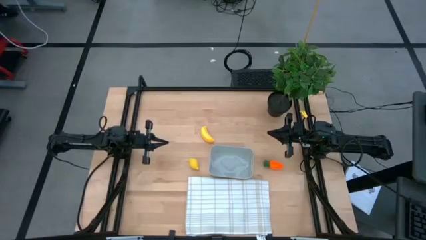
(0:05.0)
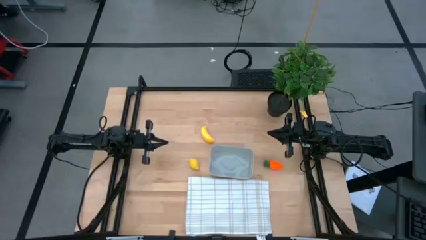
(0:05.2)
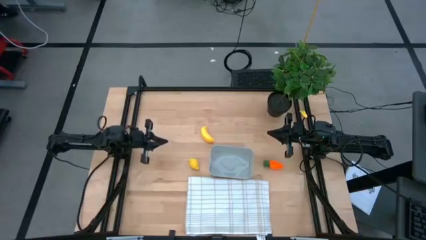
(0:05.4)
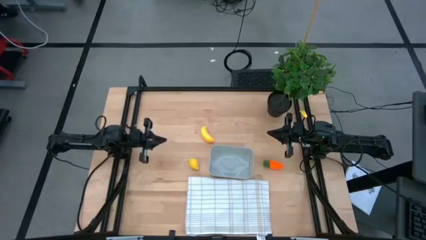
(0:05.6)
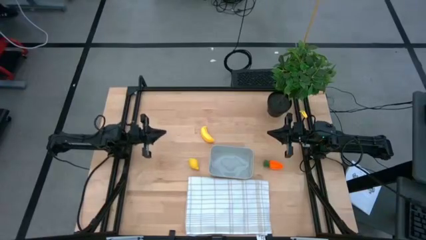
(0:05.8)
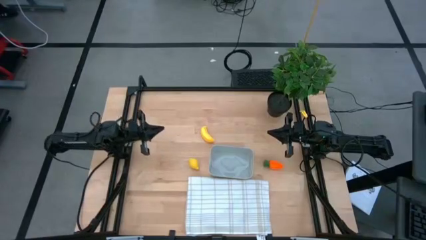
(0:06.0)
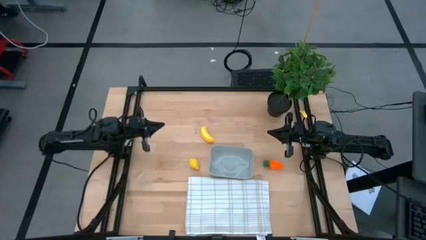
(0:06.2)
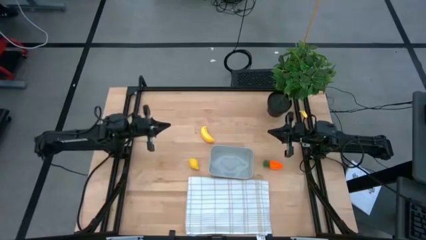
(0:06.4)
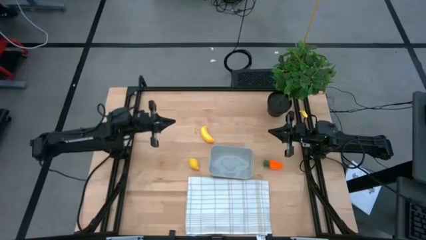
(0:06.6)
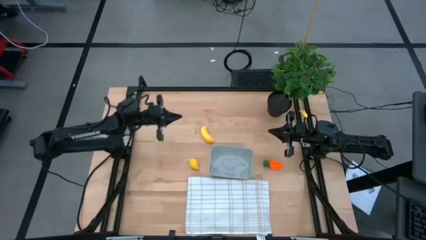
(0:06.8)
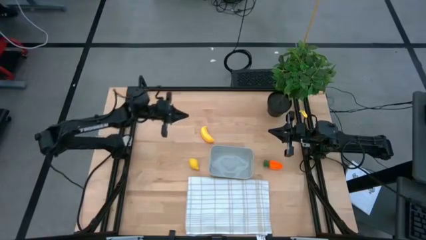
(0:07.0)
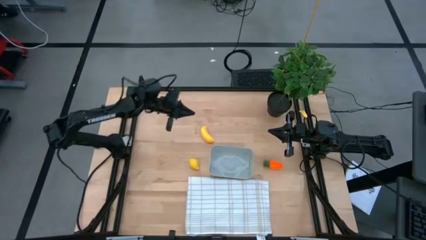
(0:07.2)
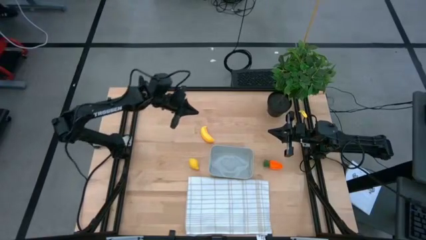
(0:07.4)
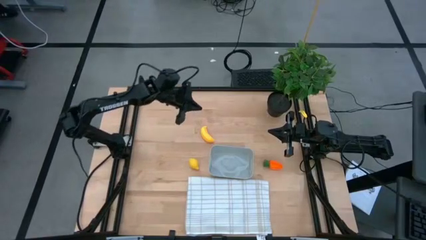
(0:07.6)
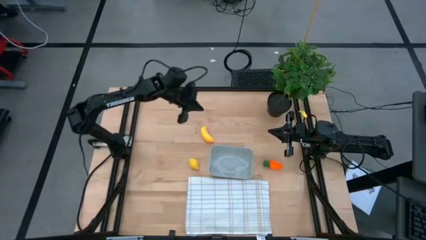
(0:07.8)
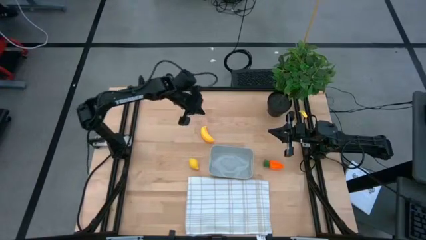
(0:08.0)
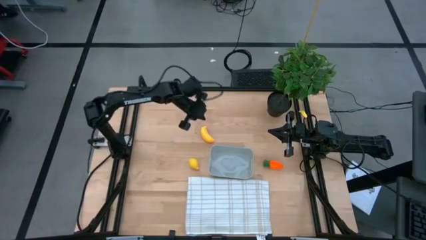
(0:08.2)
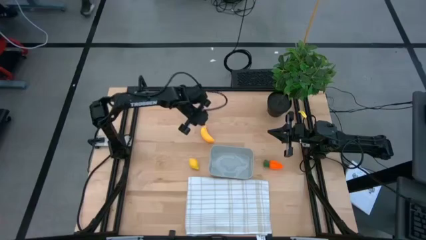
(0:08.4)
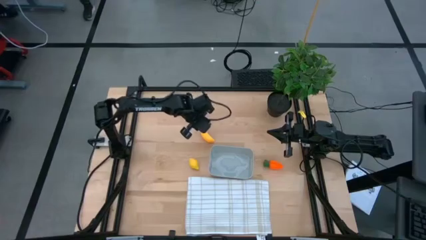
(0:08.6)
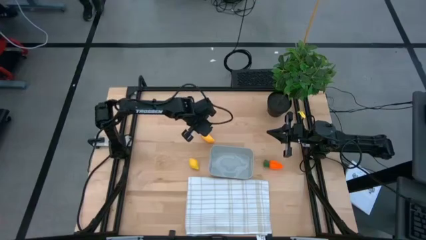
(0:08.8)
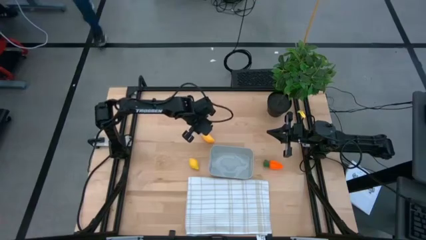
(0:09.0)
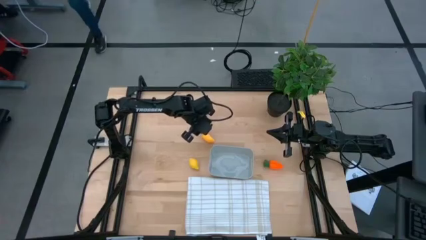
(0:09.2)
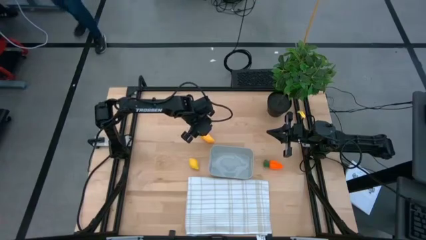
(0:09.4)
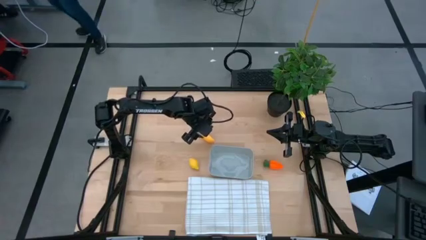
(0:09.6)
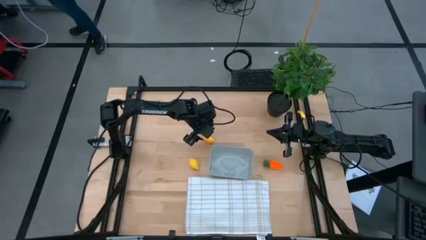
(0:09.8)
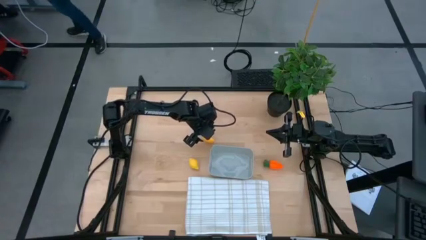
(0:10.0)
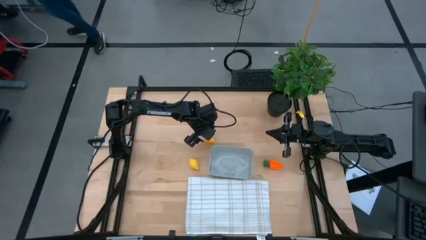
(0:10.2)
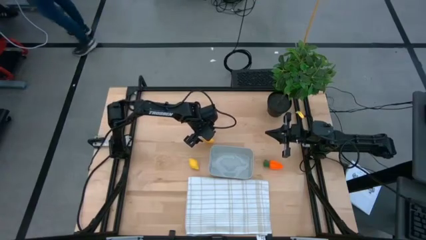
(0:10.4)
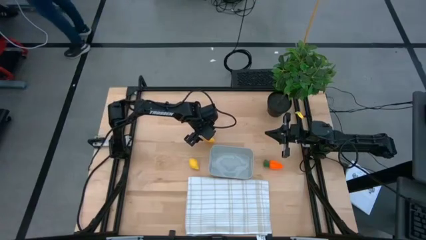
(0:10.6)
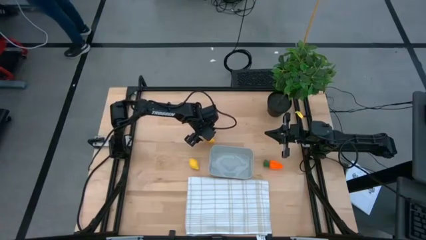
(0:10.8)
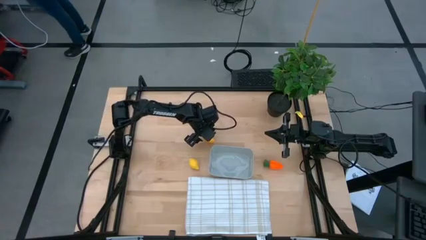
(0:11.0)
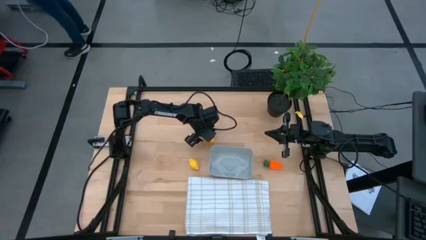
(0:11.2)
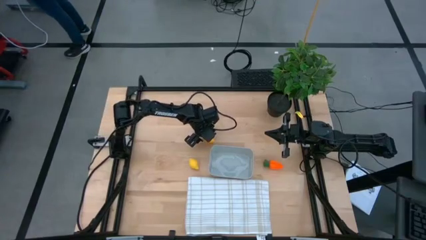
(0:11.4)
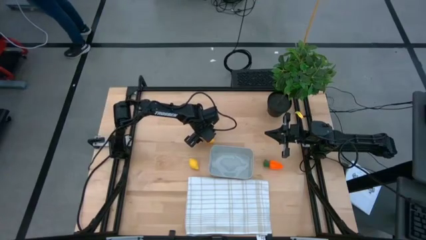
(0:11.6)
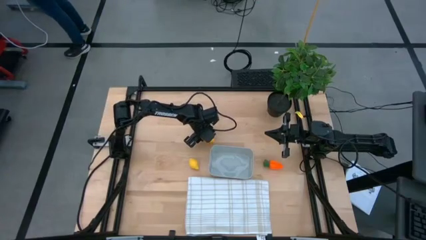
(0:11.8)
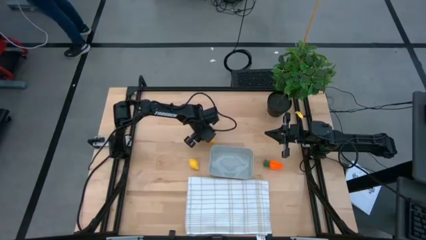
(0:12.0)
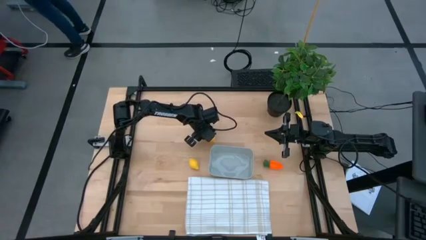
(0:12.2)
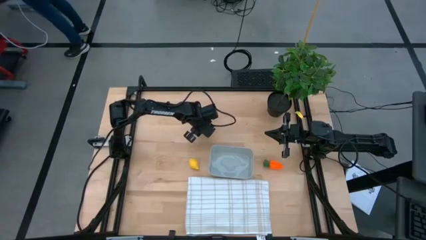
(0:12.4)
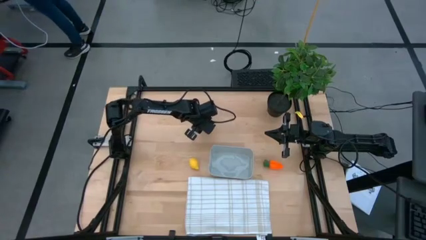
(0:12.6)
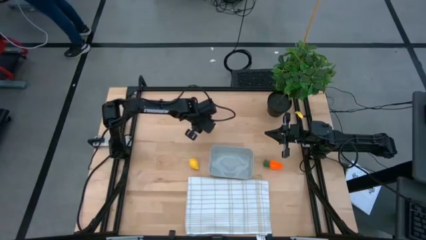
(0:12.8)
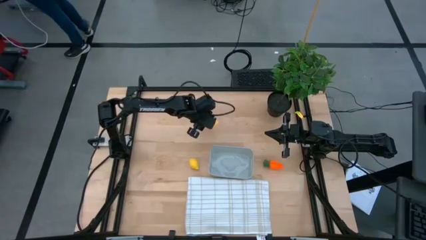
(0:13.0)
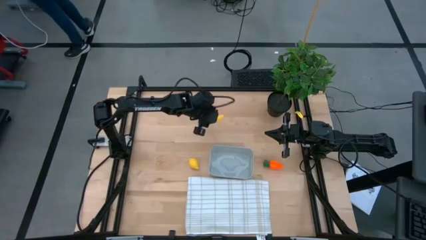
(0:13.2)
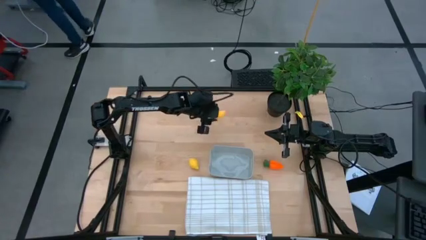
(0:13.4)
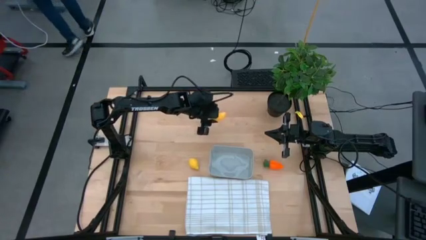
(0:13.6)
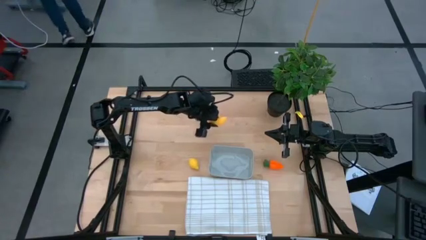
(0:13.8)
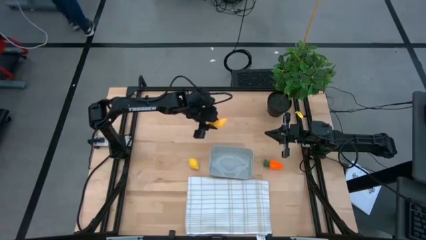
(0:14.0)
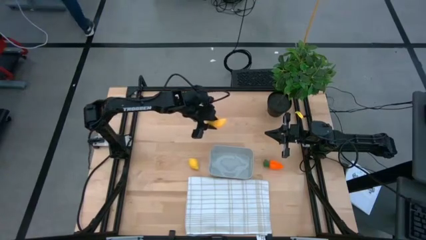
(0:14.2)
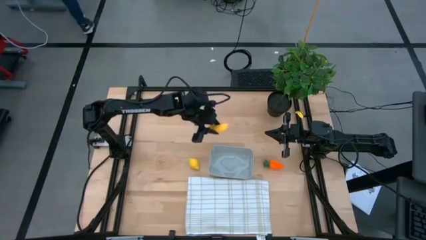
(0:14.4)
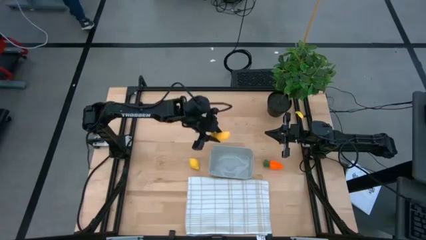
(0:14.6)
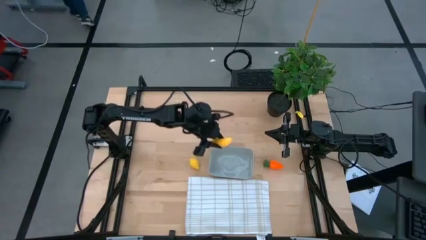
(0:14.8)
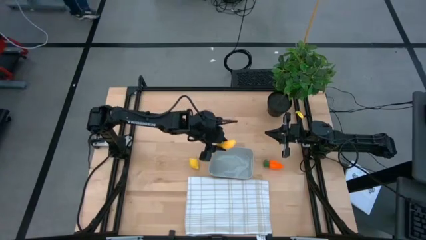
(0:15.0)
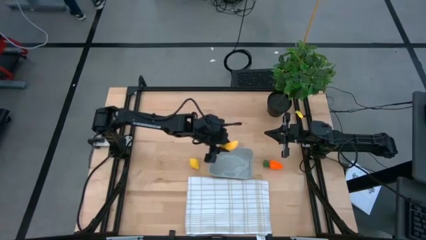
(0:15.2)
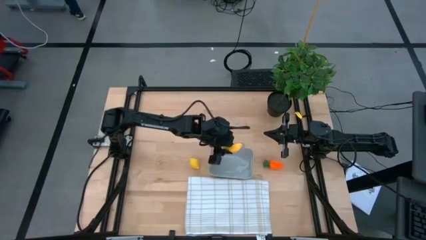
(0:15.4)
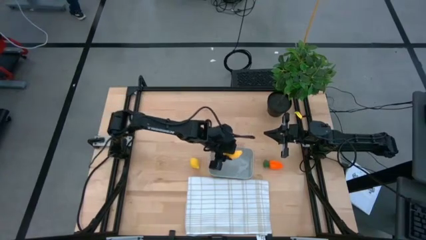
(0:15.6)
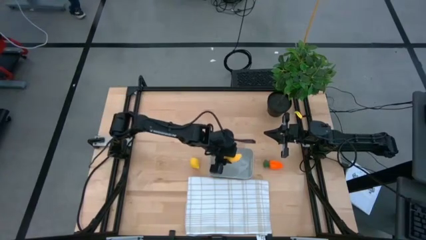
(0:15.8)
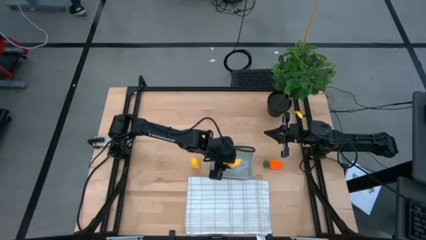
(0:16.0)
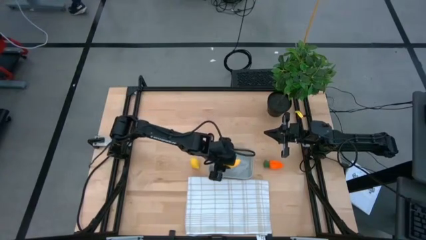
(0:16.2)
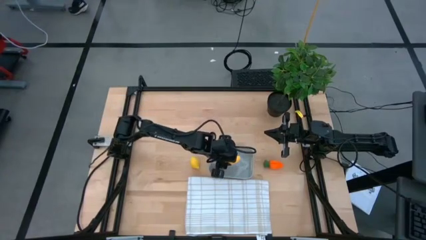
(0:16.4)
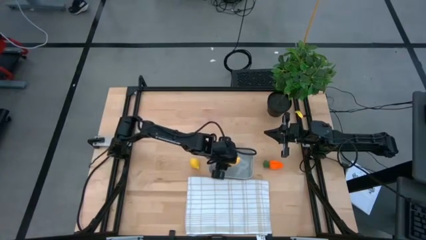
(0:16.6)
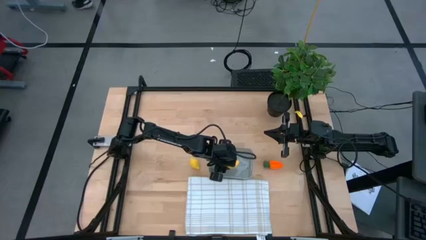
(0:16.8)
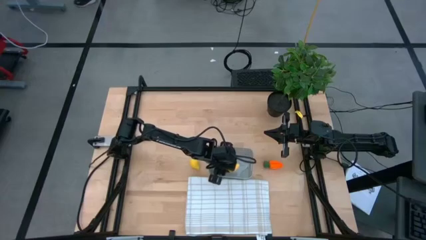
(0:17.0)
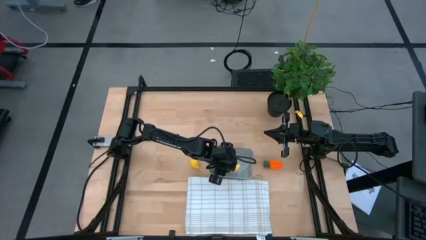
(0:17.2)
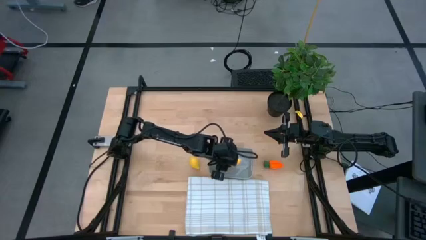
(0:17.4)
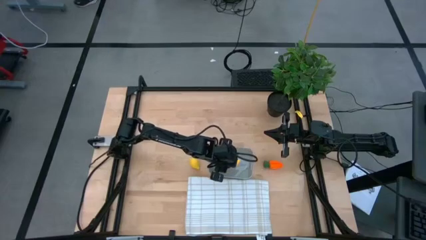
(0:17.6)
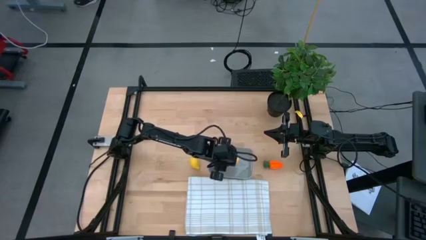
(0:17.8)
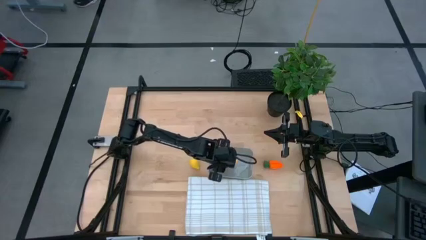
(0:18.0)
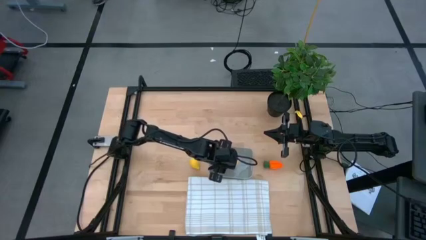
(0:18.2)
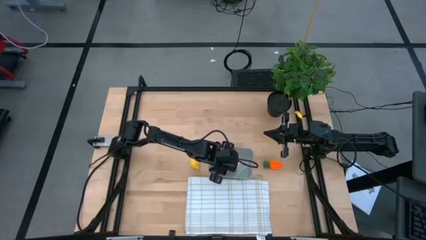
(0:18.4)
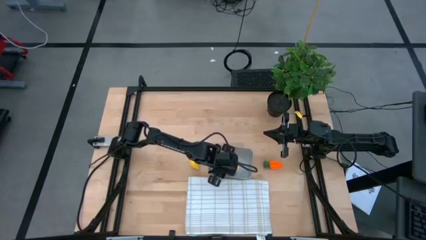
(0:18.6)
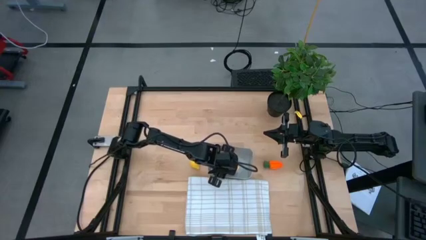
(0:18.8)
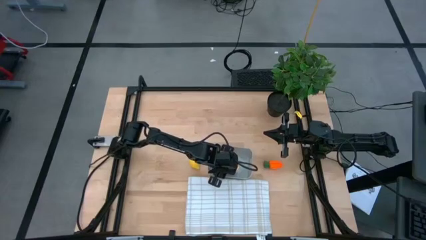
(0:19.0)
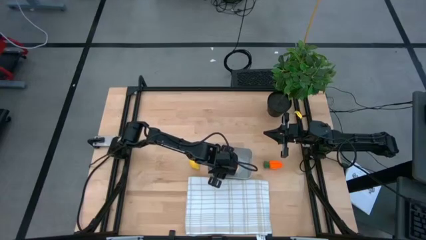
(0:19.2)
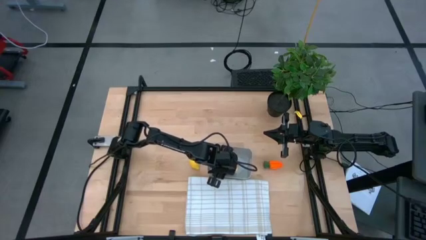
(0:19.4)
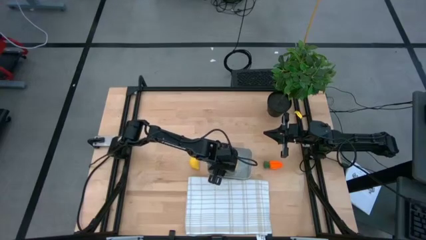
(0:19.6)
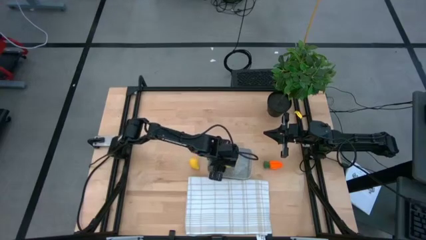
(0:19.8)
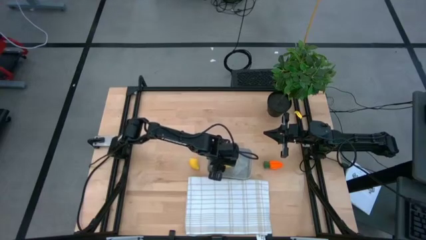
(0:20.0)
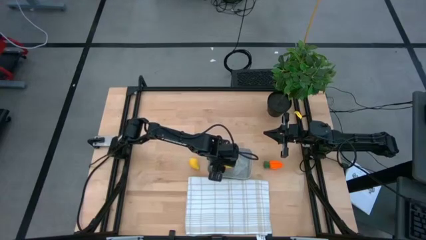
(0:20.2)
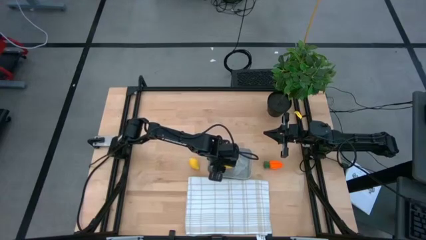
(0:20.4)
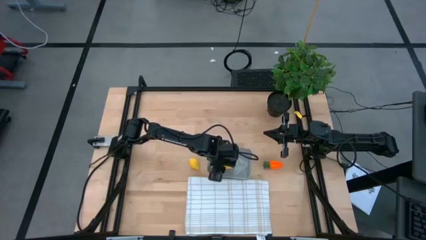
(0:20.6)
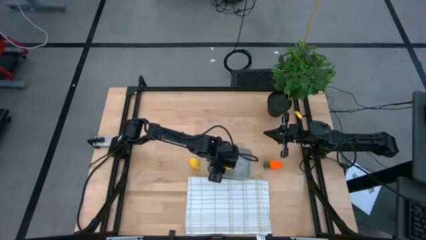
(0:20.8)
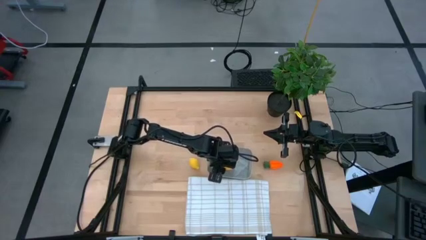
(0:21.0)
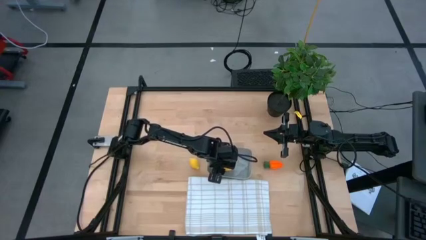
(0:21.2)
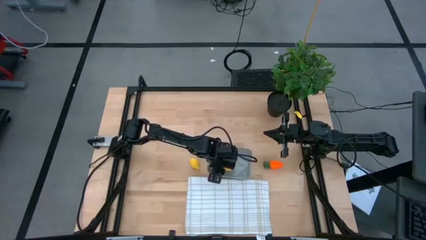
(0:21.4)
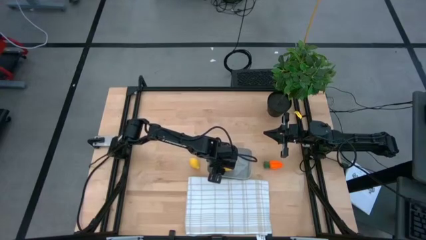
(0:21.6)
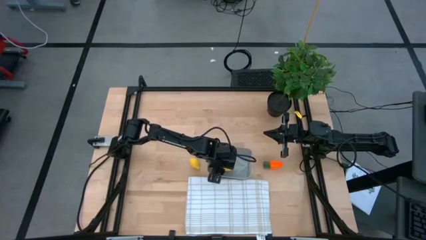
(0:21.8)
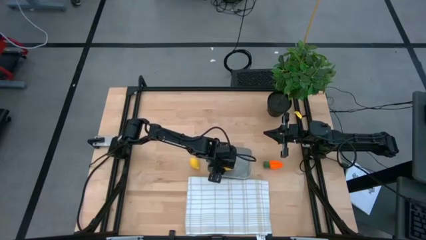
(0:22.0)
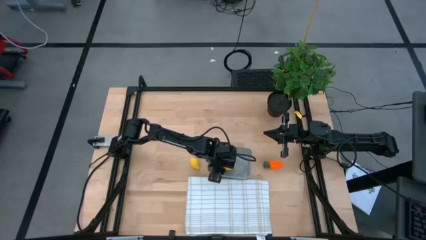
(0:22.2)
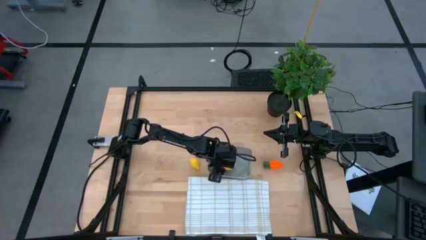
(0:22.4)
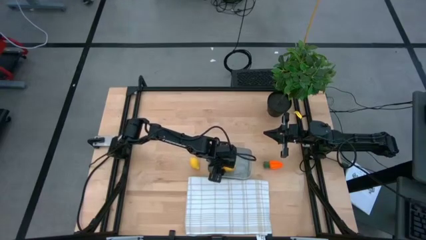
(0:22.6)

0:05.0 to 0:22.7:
Task: Pick and placing Produce into tupperware
Put the yellow banana into the gray bin
